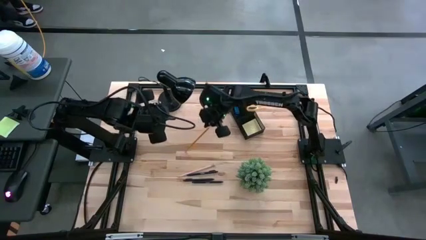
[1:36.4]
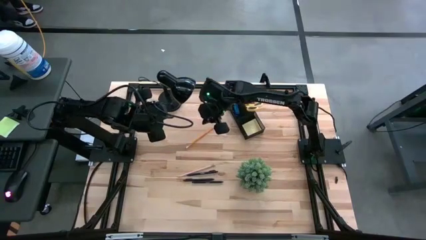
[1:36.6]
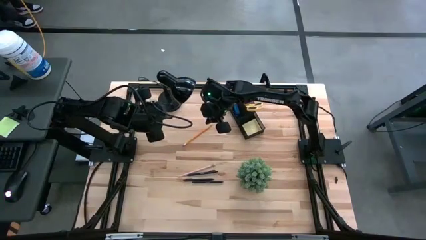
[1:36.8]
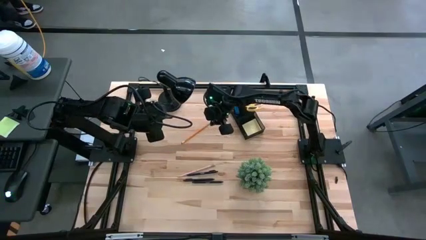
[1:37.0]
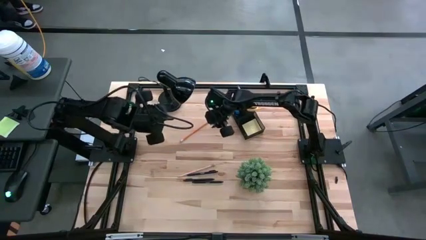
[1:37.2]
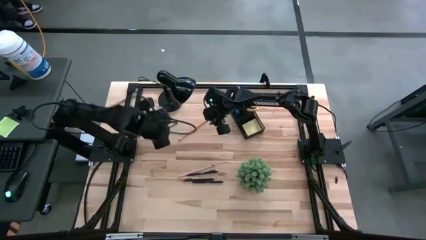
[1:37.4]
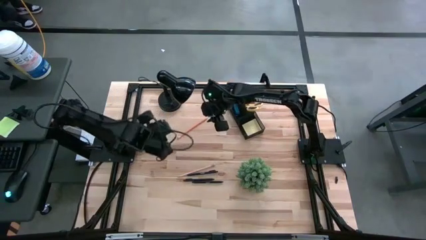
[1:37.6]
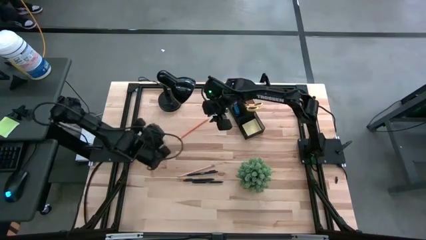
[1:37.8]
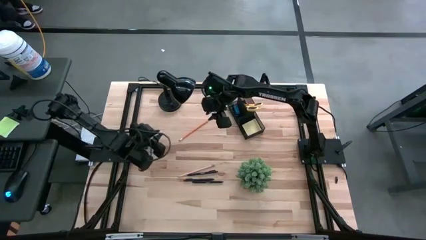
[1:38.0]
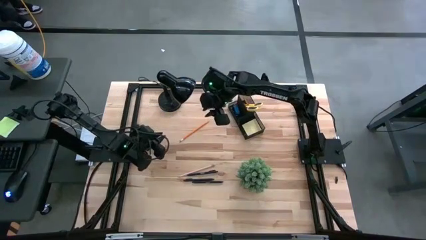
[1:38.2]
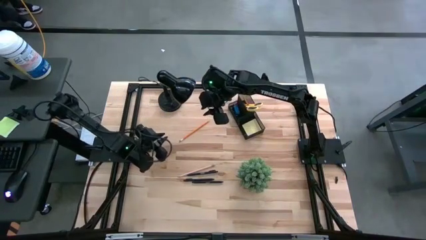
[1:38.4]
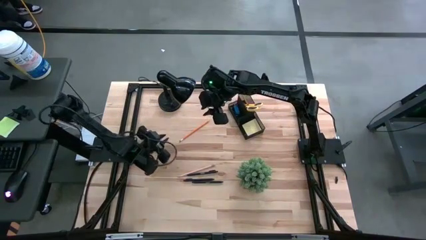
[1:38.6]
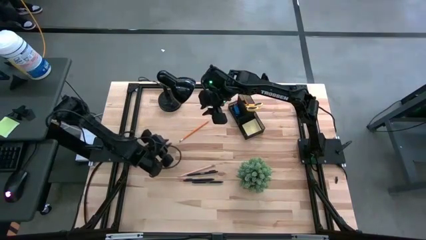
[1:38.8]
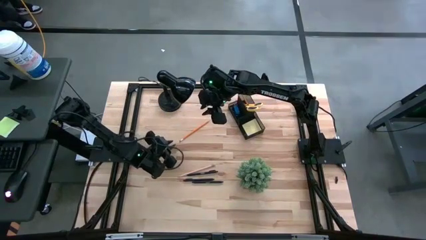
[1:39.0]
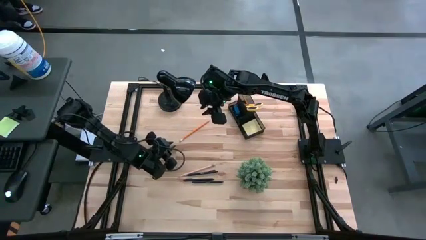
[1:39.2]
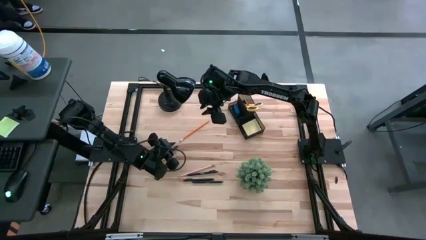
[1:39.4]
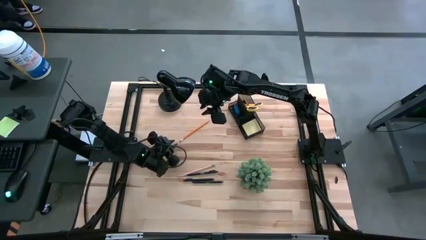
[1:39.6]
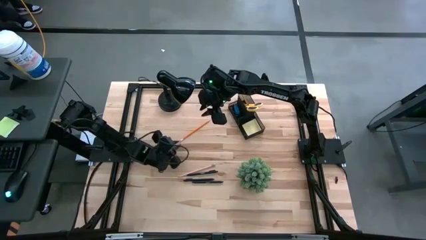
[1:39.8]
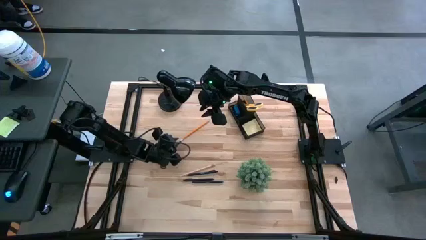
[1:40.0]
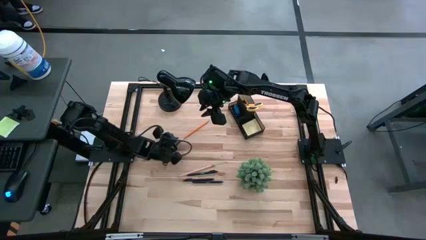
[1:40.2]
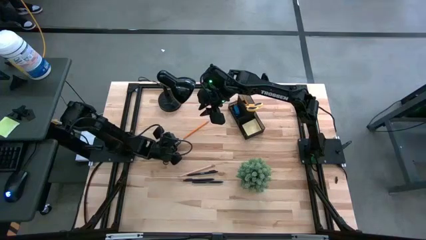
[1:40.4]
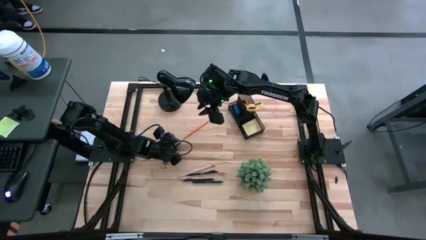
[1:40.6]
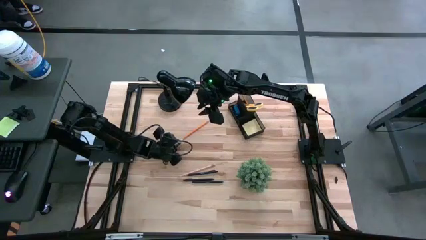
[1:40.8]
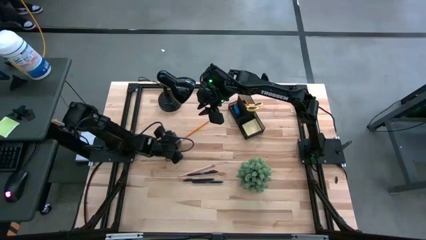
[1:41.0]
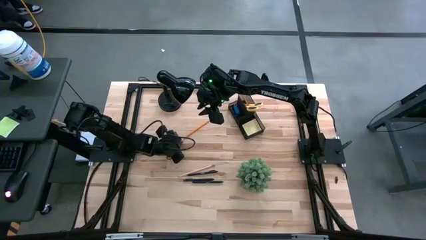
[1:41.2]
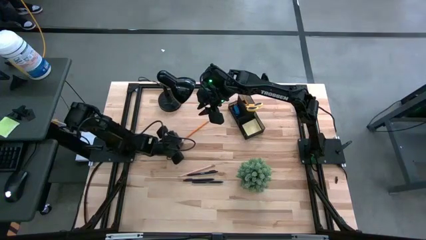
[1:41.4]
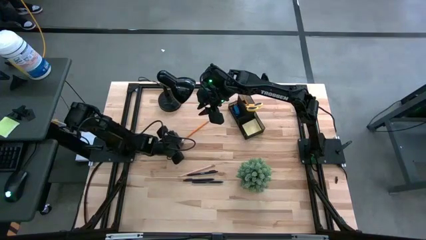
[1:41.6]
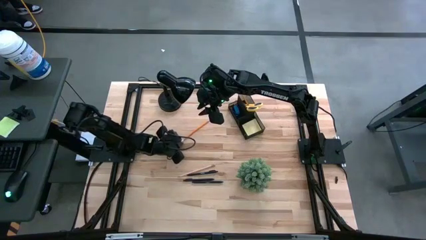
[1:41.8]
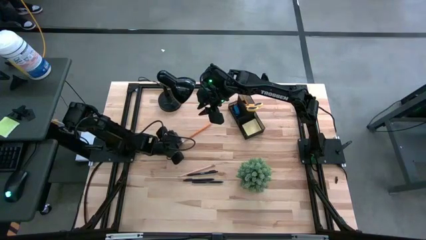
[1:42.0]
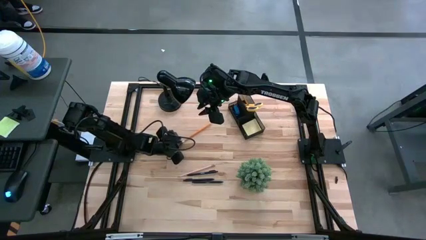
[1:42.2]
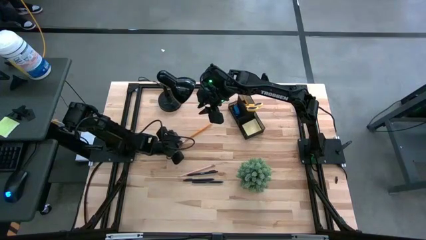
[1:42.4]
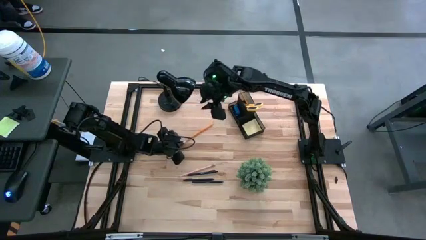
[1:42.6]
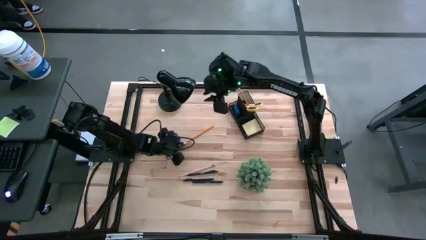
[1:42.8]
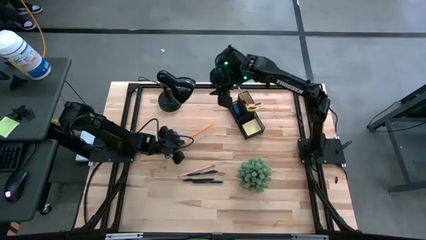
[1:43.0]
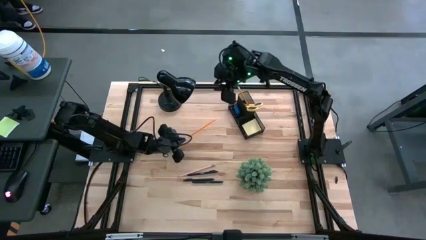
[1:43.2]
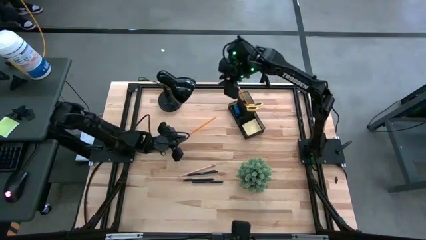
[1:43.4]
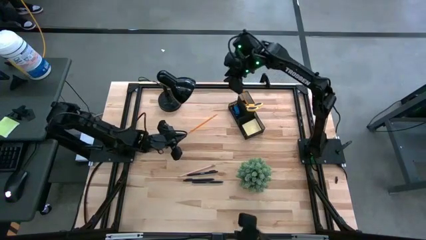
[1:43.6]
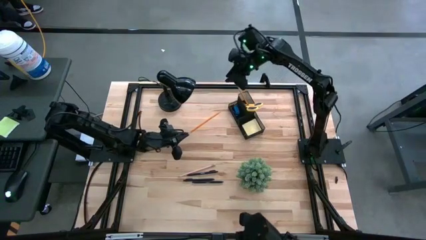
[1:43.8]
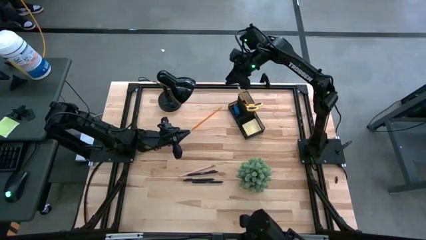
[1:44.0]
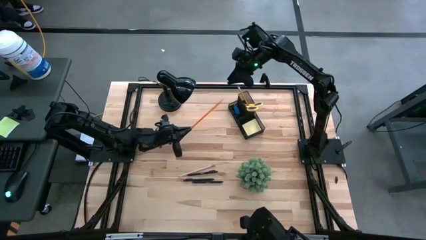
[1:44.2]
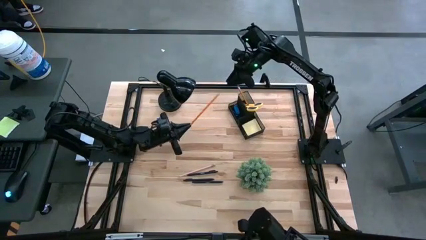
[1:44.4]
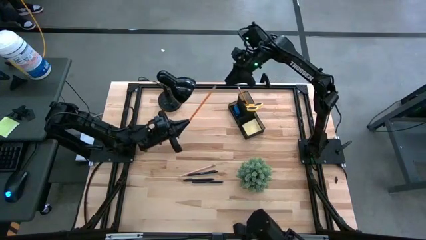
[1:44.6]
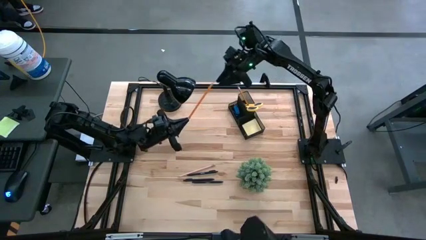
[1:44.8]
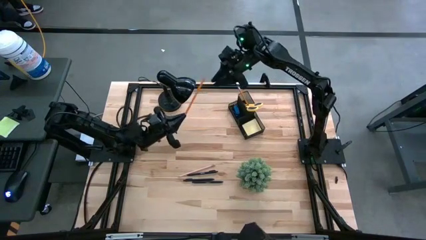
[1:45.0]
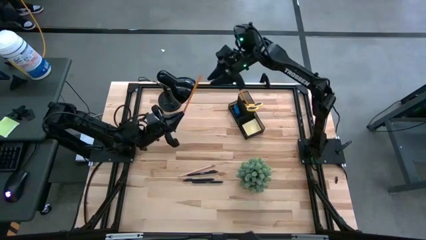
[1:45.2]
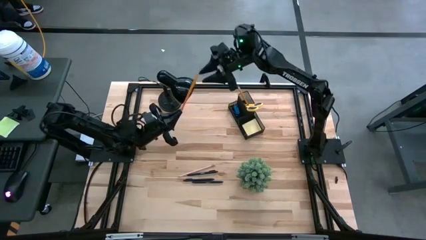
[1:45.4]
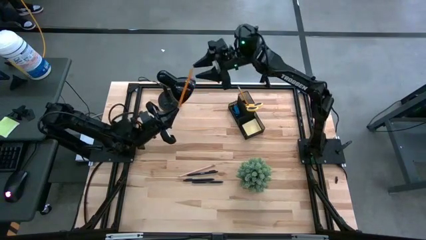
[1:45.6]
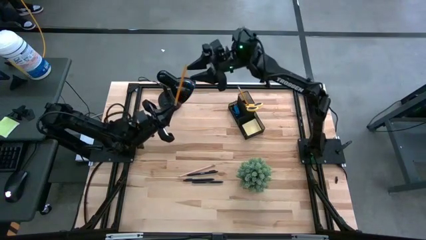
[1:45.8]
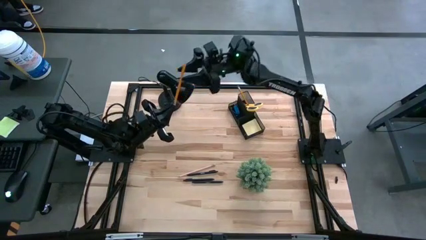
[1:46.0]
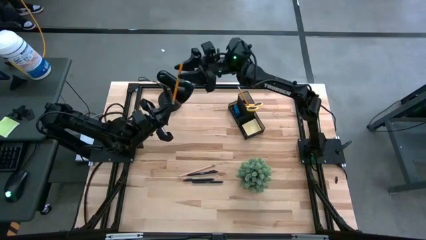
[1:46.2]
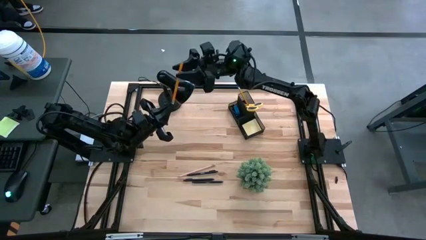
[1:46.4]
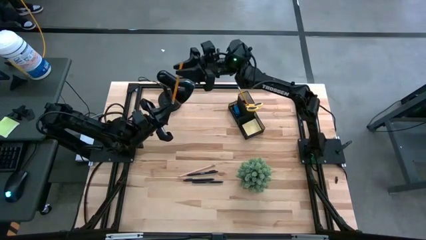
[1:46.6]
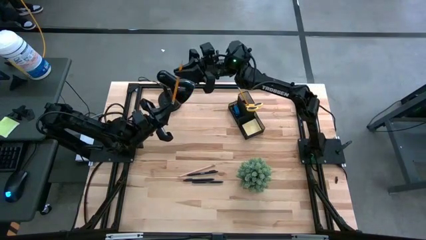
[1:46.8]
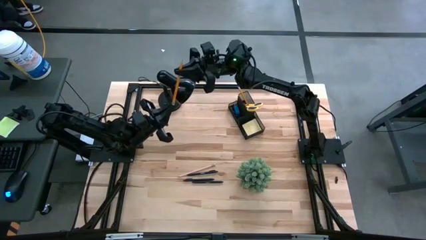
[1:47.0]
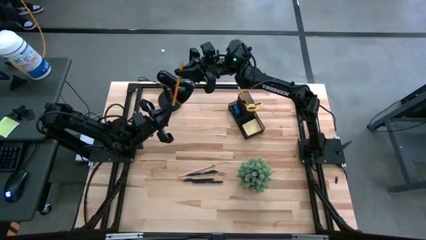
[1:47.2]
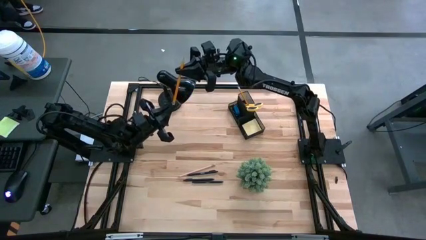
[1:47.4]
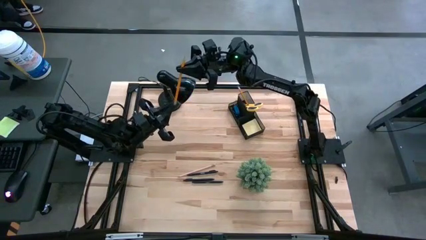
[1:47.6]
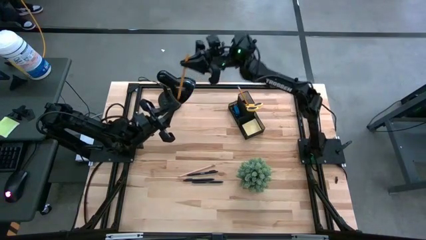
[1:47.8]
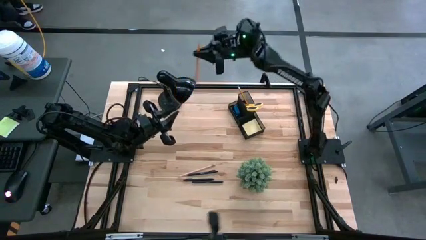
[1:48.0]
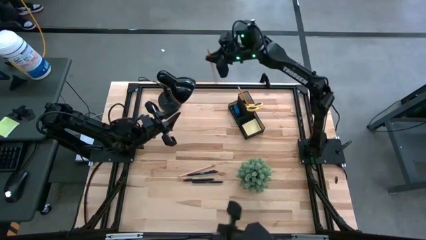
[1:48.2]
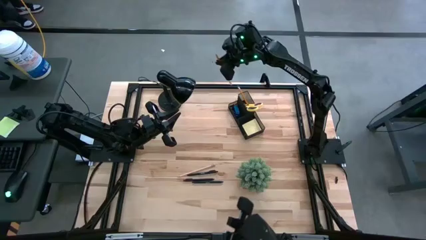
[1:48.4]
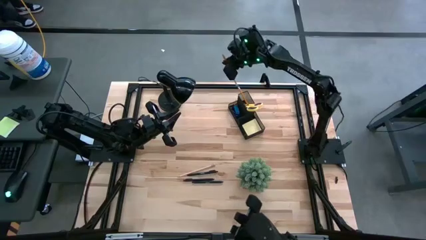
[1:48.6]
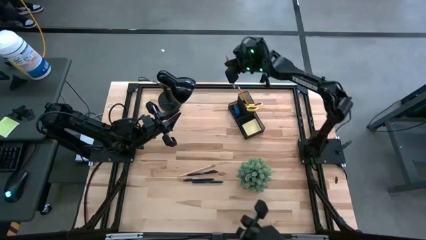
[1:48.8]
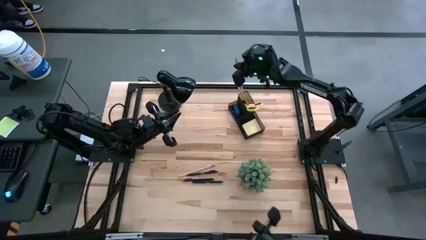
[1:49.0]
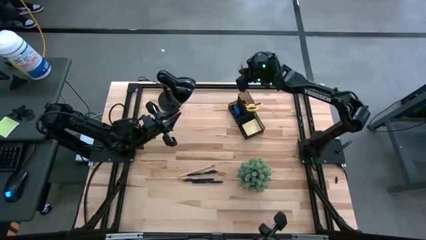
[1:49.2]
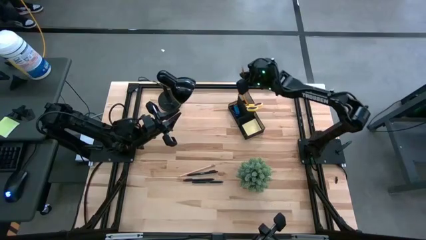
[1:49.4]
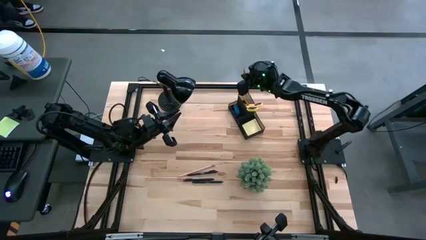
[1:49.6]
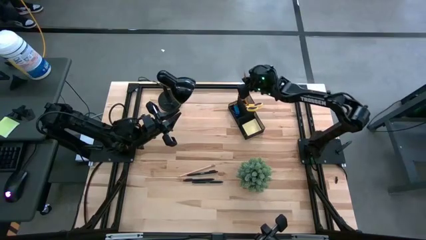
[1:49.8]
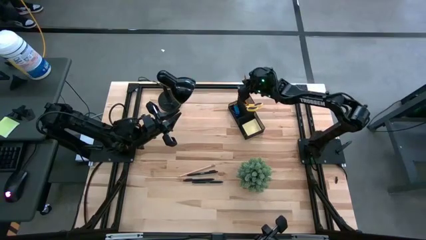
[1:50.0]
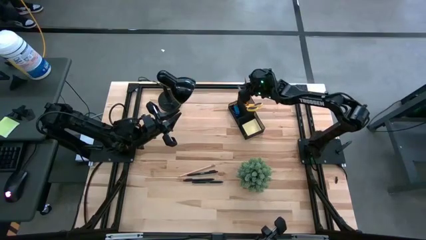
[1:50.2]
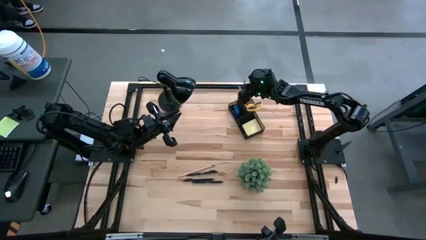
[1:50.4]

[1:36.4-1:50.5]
Task: Pick and place office supplies into organizer
Put the orange pencil into the desk organizer

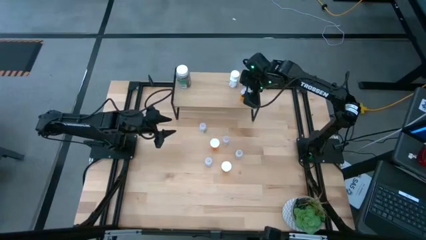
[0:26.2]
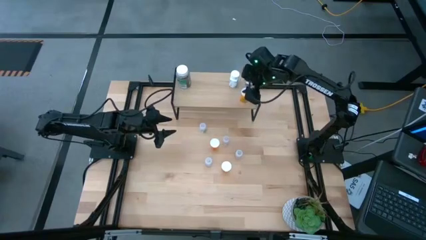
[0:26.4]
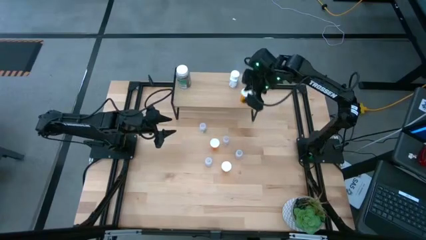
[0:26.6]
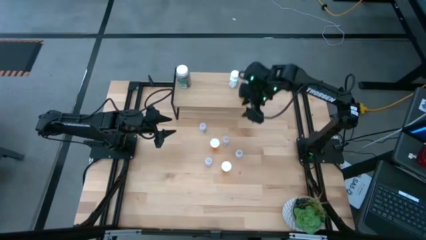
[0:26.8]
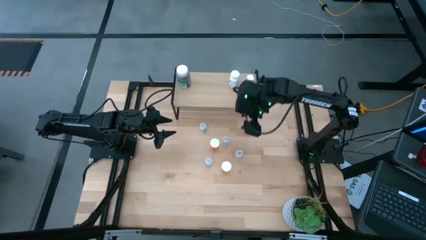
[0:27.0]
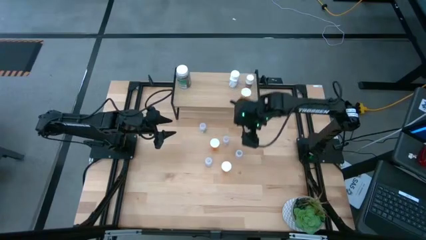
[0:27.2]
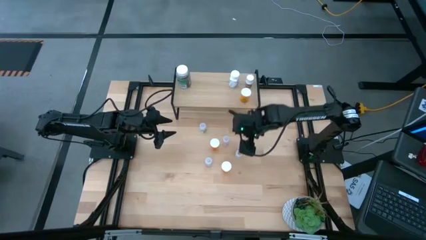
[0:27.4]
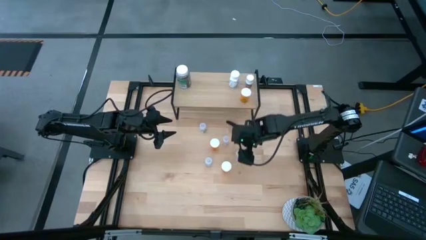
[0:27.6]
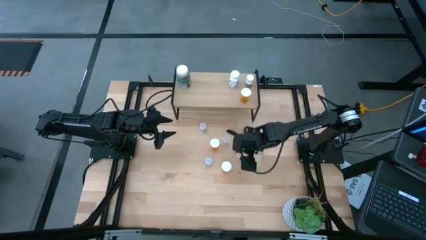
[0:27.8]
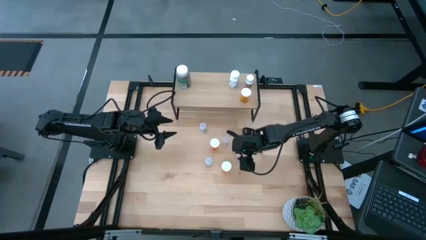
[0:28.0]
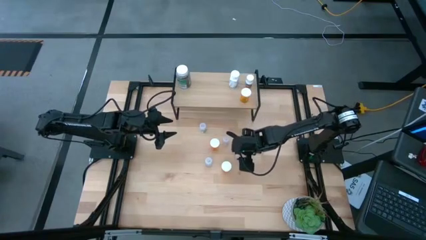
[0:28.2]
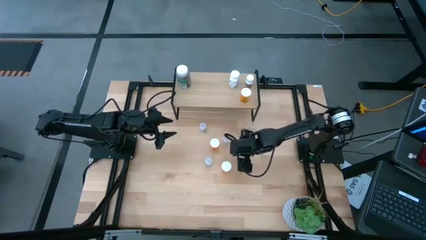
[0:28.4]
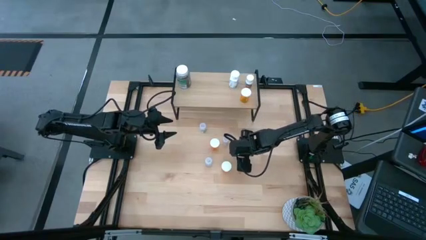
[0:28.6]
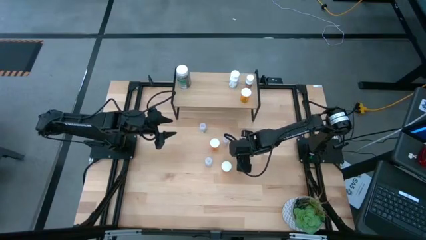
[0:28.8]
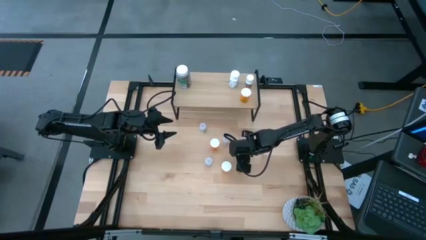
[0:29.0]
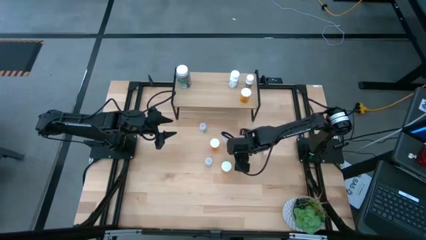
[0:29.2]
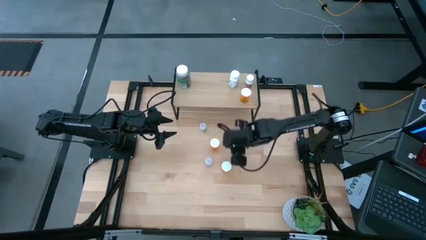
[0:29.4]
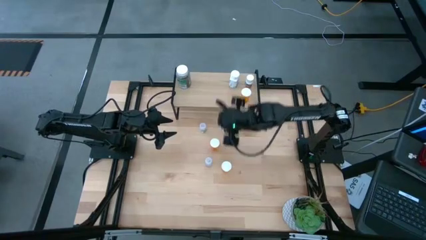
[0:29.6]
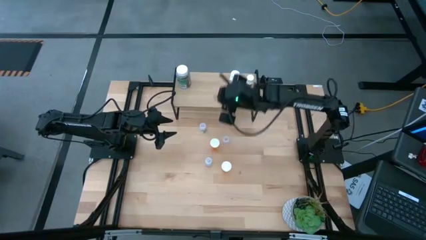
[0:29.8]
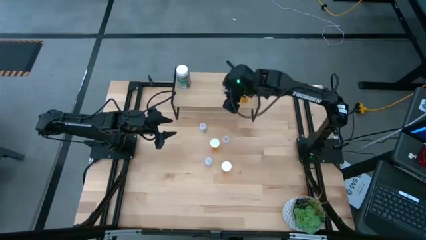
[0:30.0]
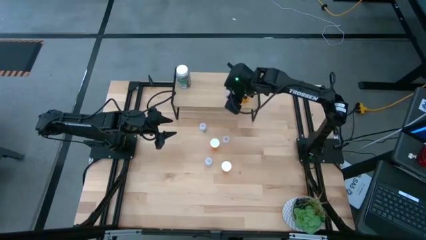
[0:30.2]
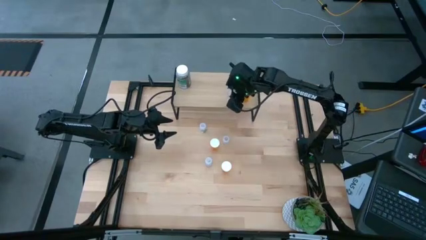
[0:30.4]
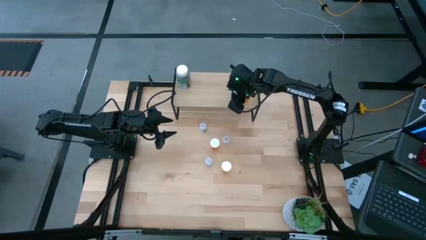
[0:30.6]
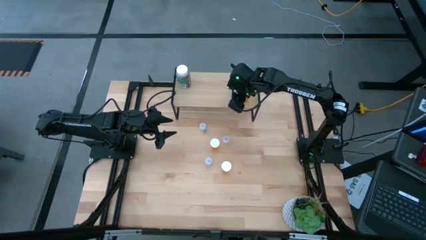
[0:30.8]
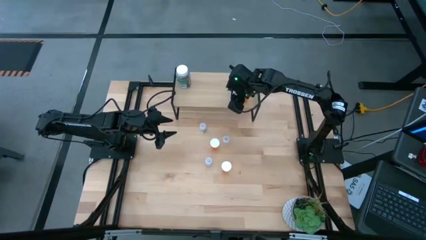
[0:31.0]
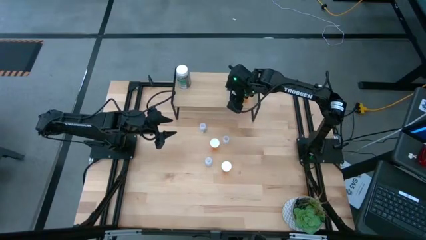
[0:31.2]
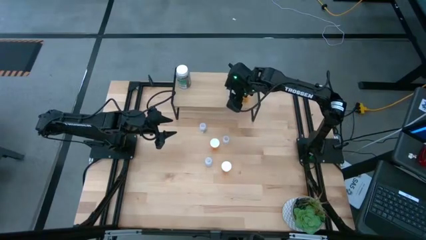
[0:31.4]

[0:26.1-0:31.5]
Task: Pick and place medicine bottles onto shelf by color
Put the transparent pill bottle on the shelf
